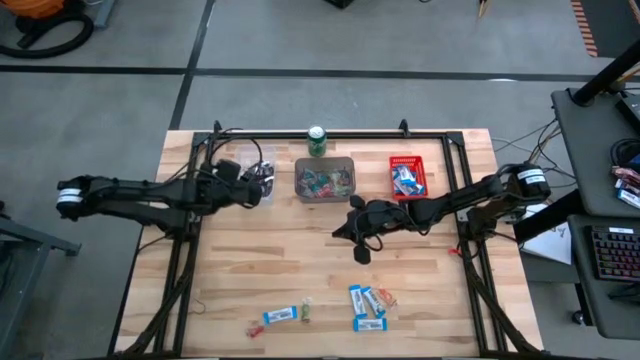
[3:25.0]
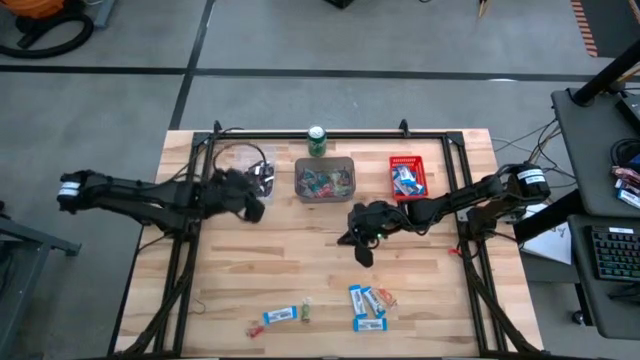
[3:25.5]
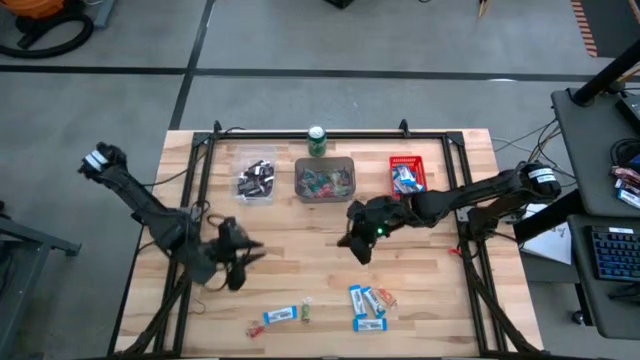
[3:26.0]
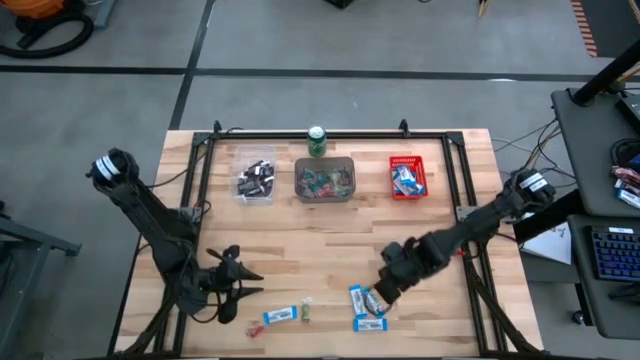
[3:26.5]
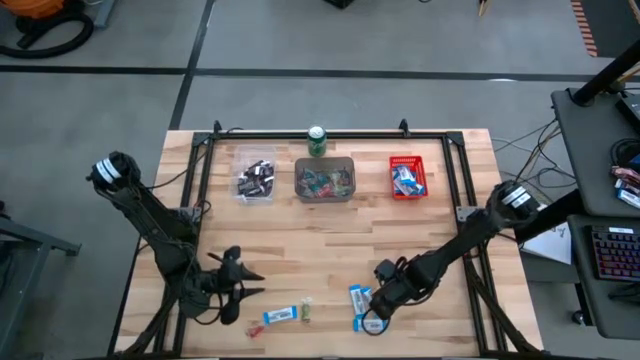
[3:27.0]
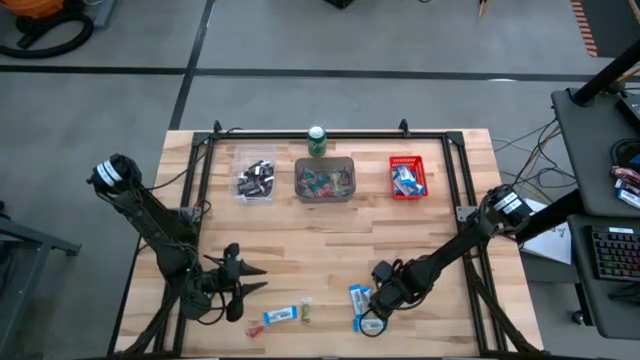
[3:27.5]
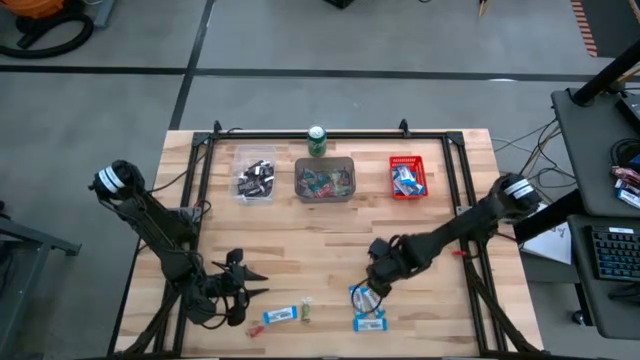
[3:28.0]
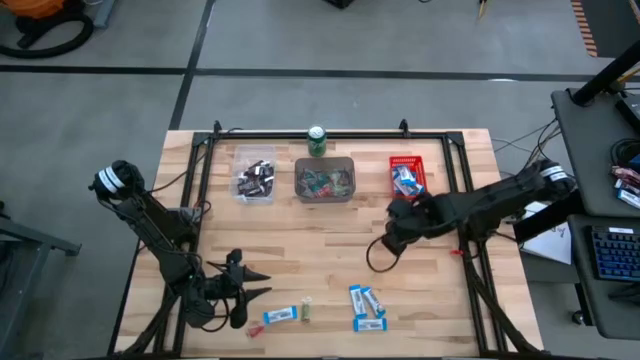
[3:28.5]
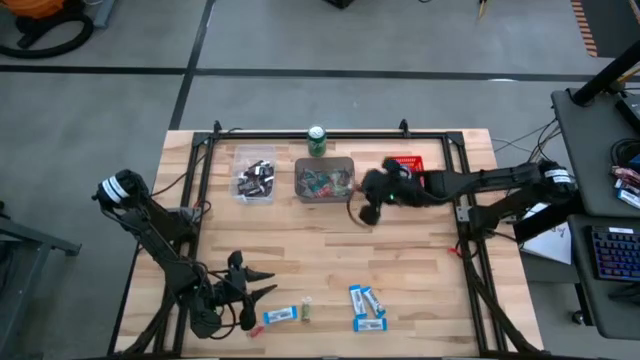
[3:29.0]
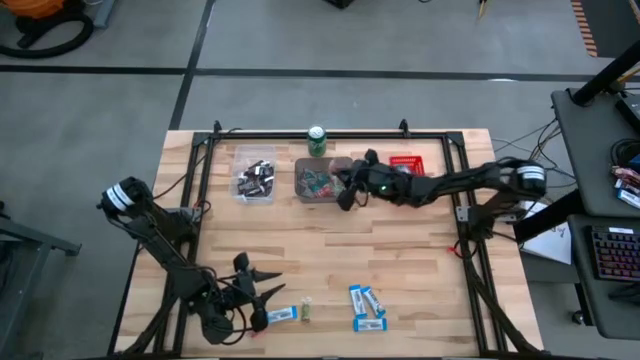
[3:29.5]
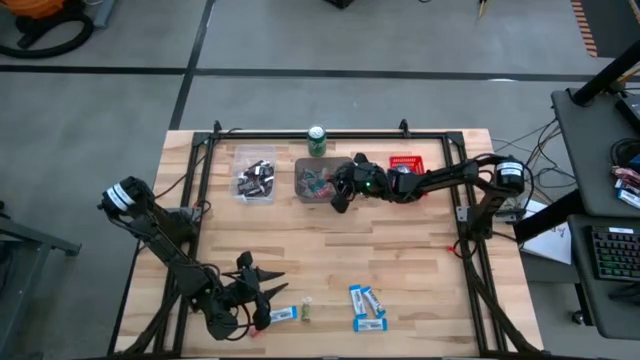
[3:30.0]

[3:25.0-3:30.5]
Task: Organize candy in baskets
Put the orange gummy into the black bin

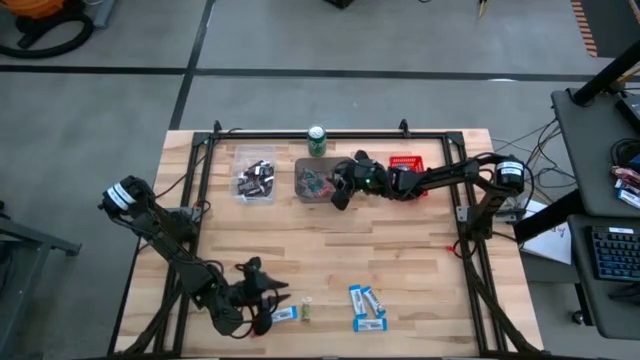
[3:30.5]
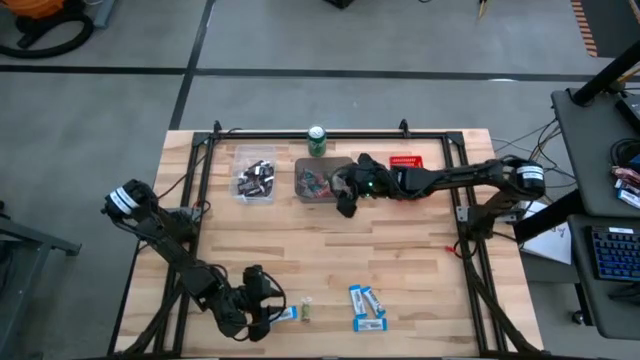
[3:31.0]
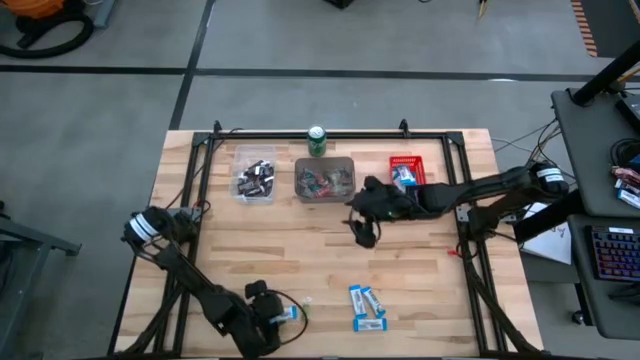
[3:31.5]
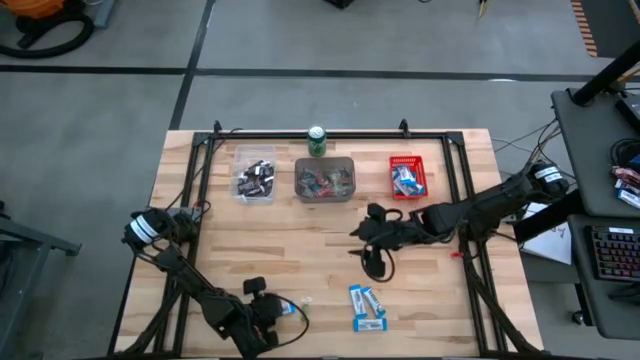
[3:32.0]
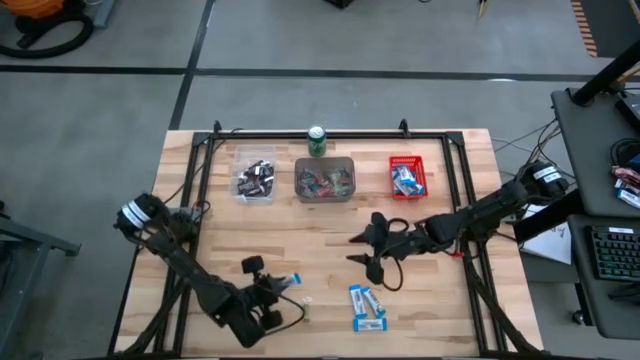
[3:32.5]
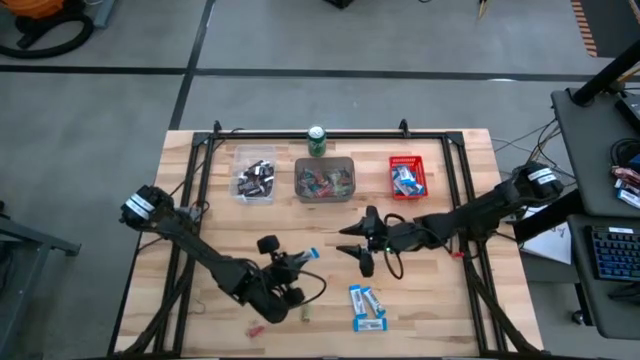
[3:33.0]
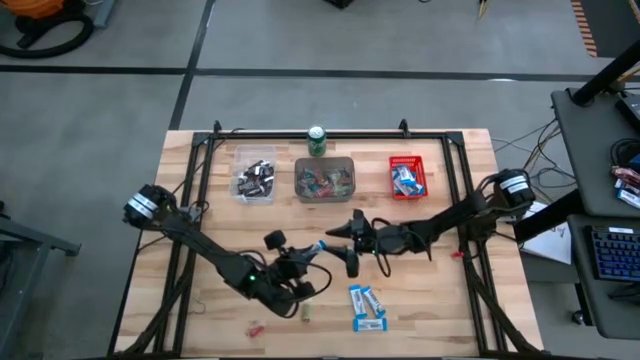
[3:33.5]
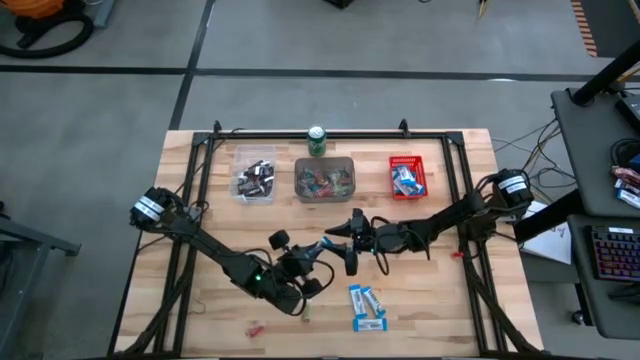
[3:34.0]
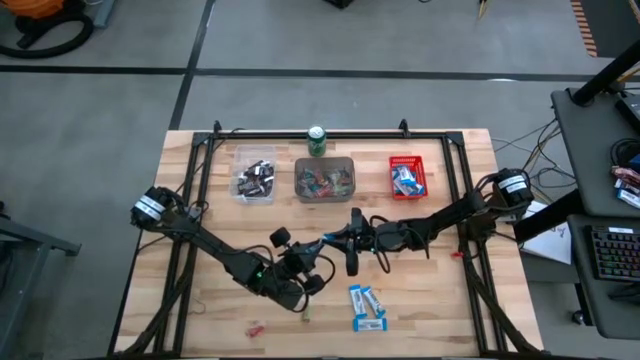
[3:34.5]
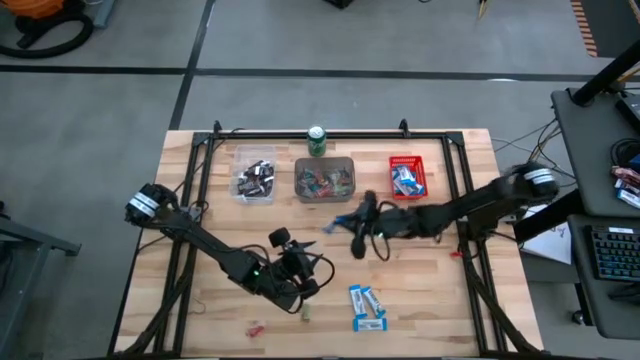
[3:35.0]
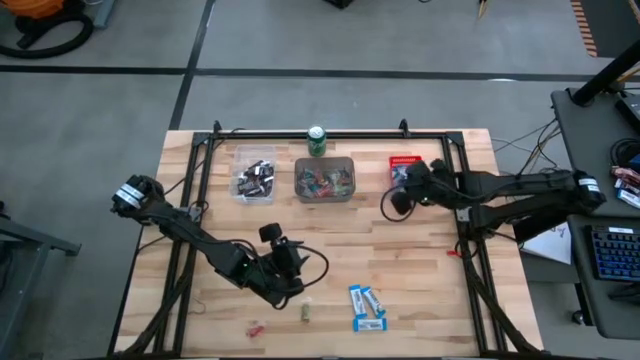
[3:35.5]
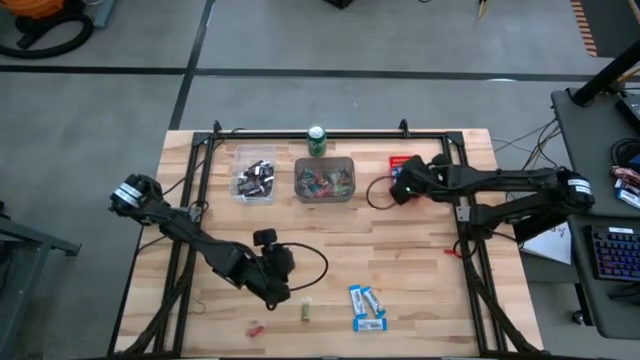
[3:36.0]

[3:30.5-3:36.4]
Put the white chocolate bar into the red bin

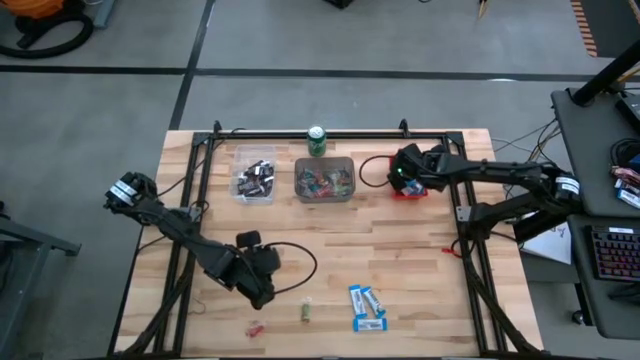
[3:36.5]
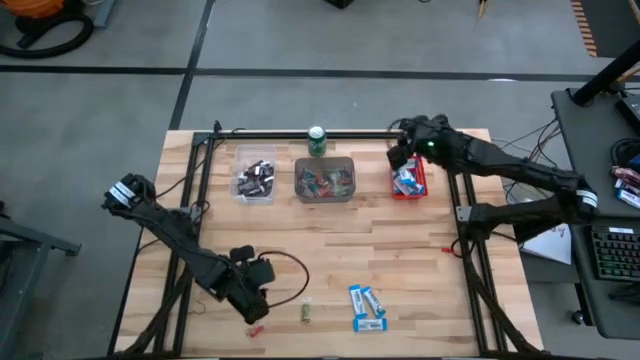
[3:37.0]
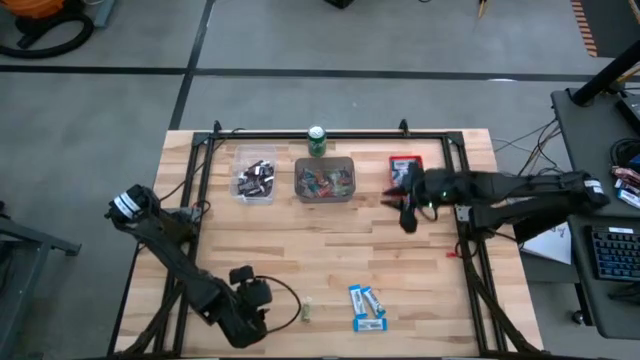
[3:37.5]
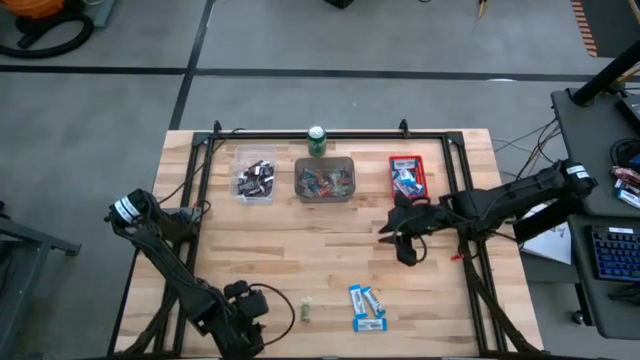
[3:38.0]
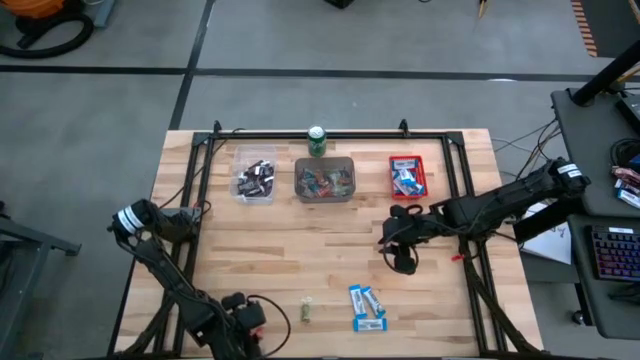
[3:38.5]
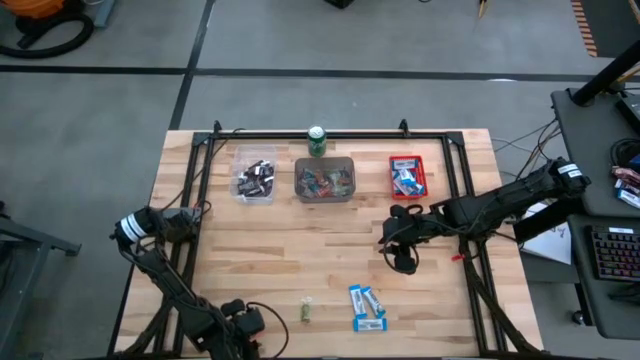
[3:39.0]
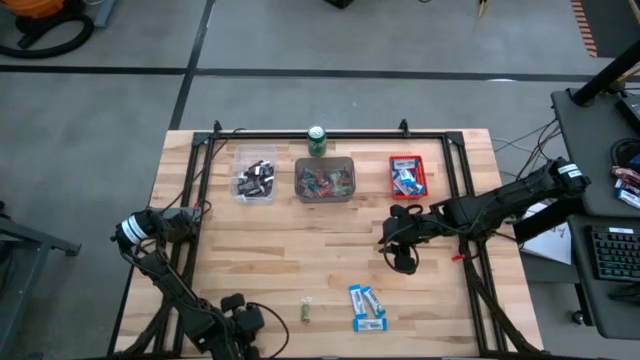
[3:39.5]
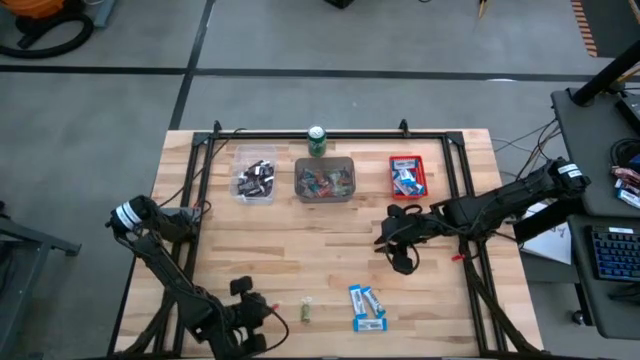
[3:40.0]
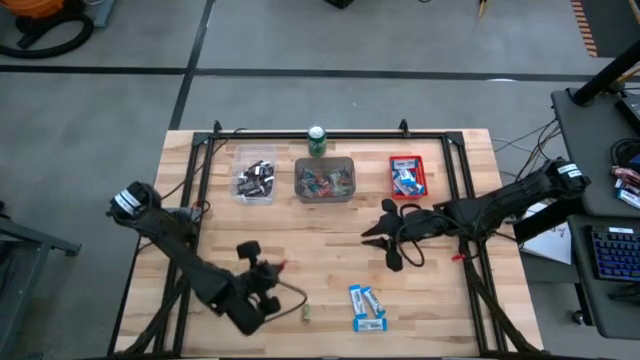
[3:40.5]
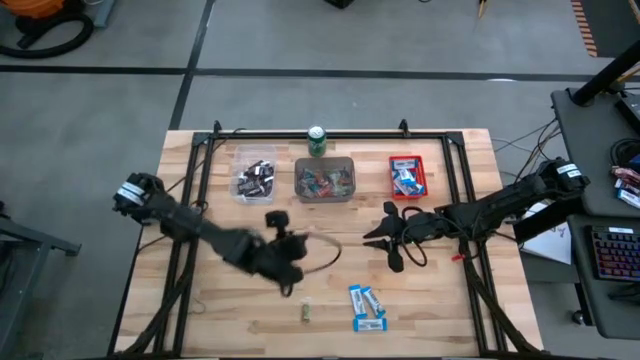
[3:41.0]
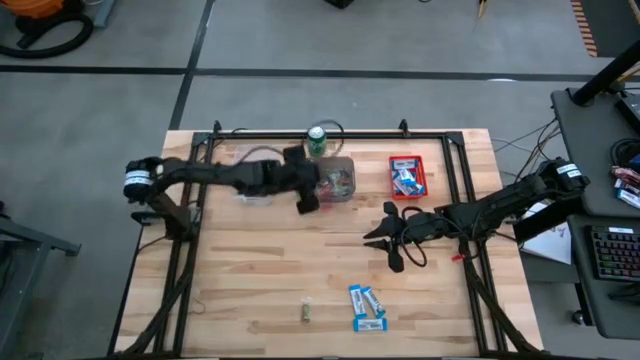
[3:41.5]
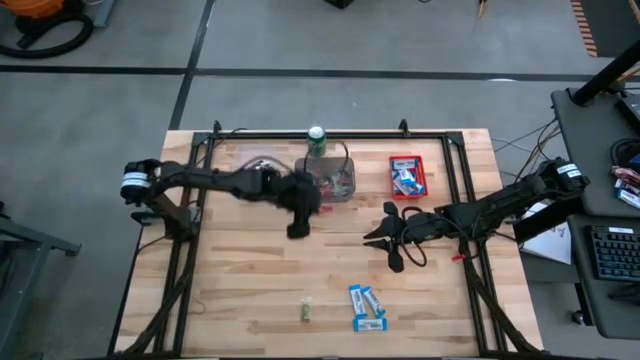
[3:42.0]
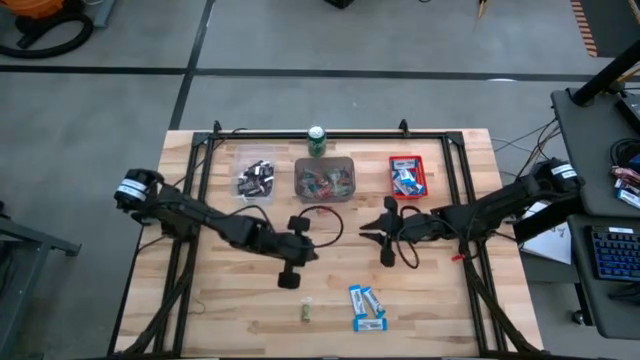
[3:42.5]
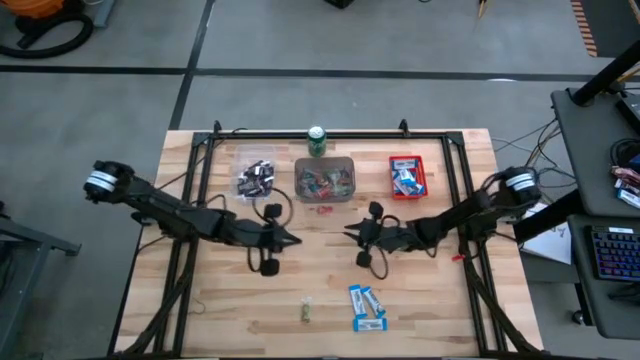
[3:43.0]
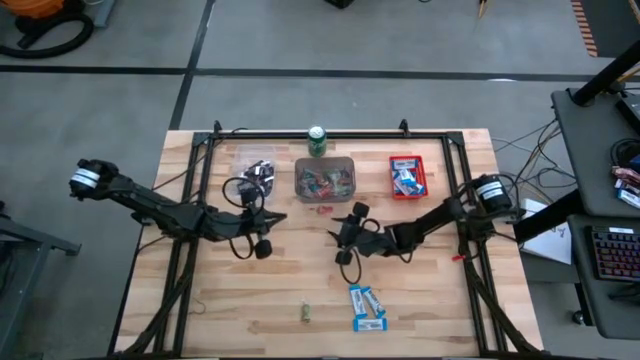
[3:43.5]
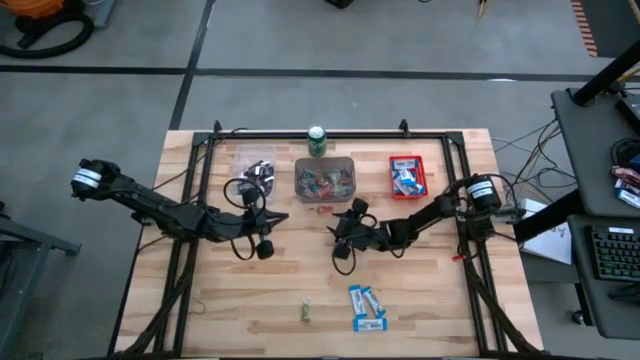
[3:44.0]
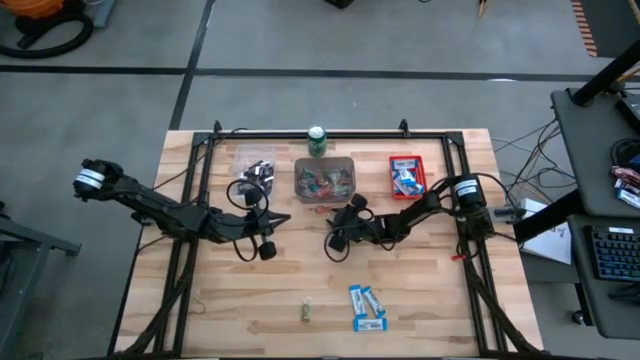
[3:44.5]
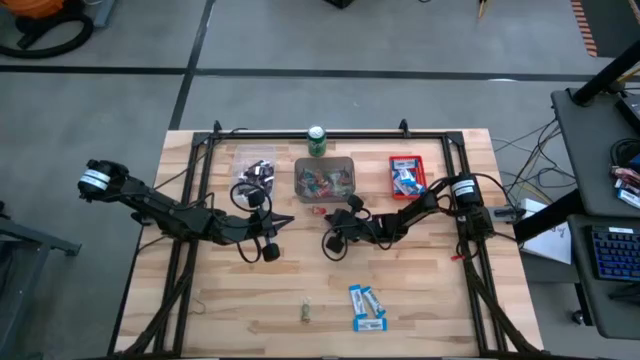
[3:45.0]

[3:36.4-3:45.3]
Put the orange gummy into the black bin

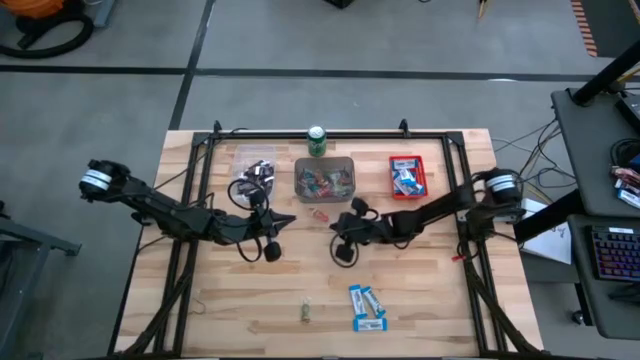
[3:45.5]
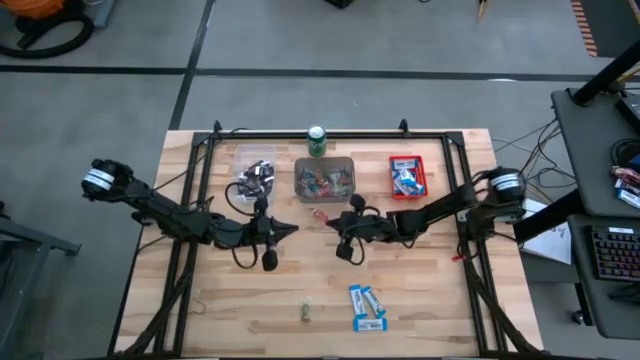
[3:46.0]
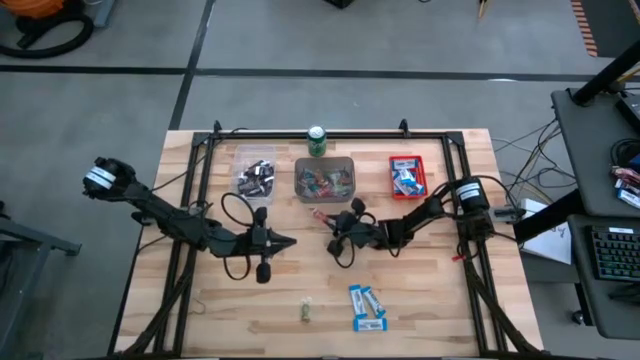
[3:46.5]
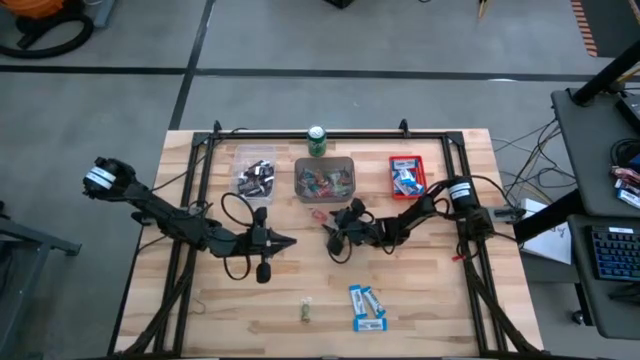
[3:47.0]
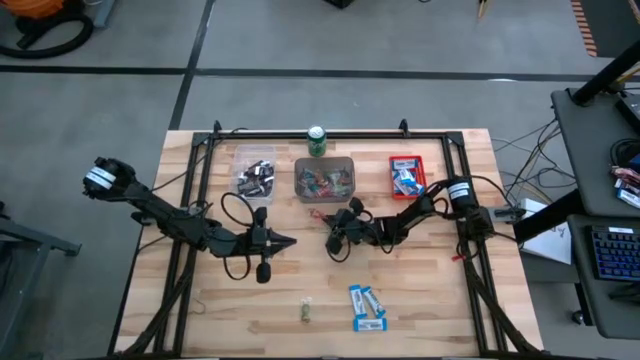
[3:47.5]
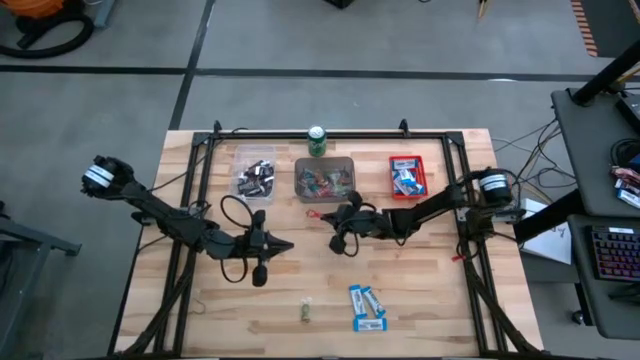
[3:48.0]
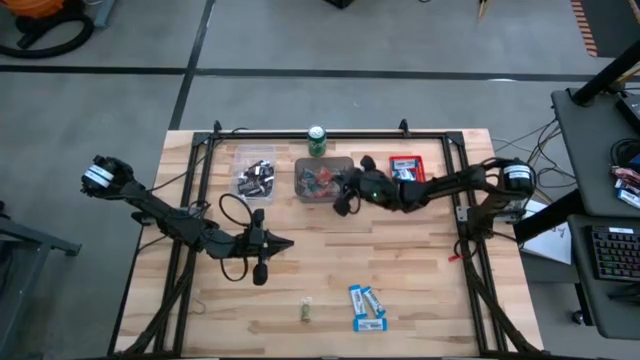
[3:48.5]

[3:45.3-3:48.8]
Put the orange gummy into the black bin
